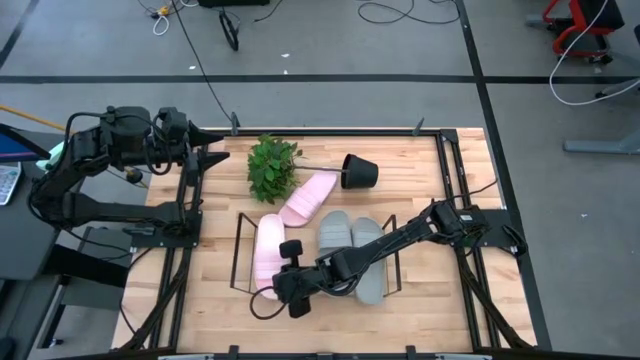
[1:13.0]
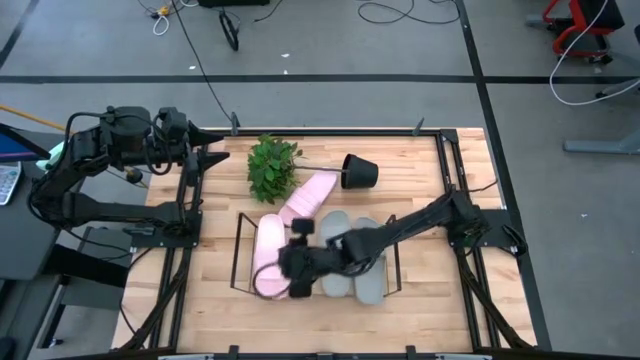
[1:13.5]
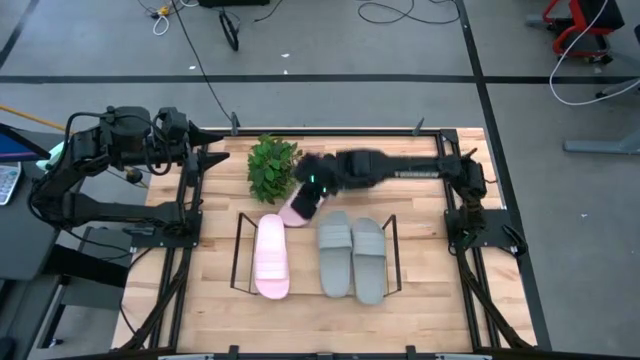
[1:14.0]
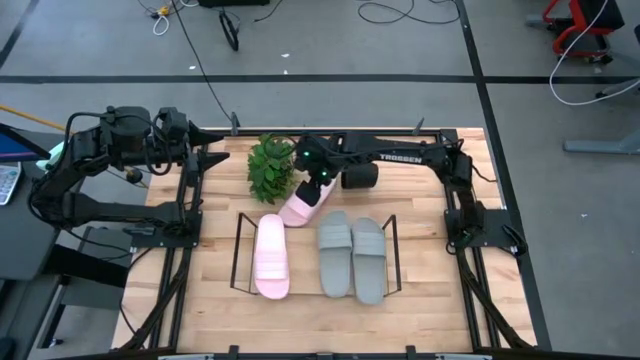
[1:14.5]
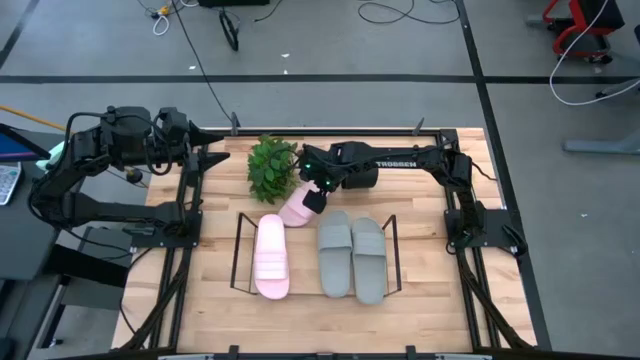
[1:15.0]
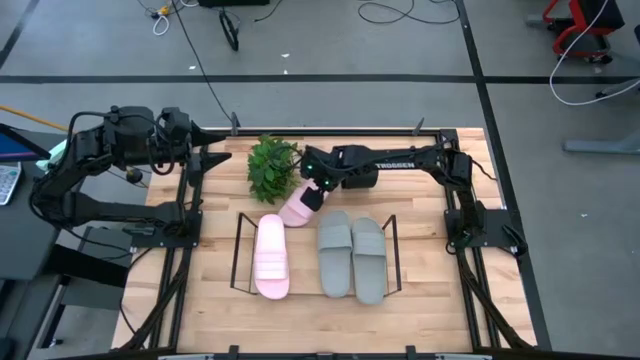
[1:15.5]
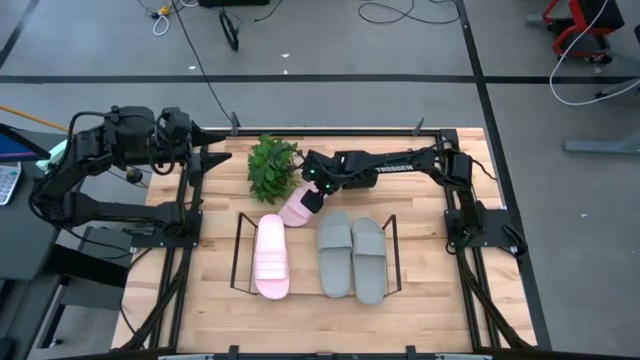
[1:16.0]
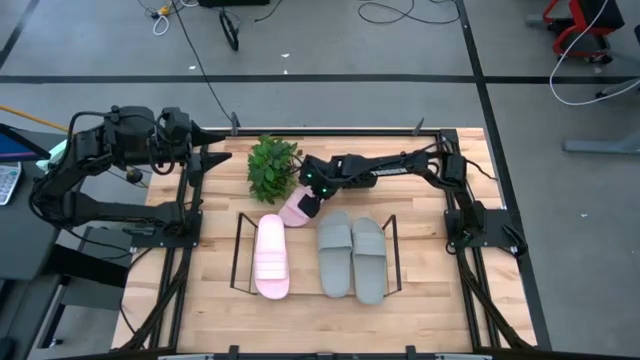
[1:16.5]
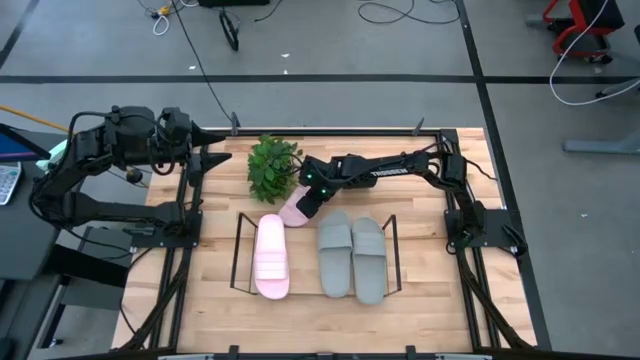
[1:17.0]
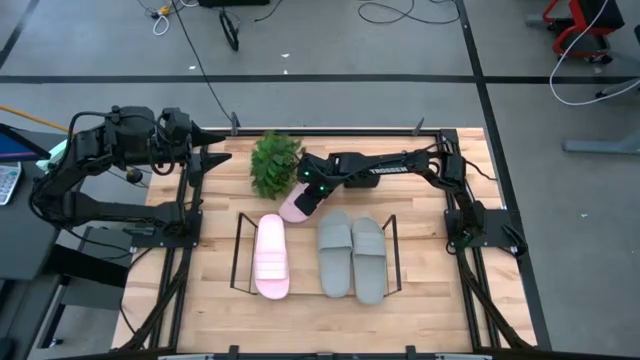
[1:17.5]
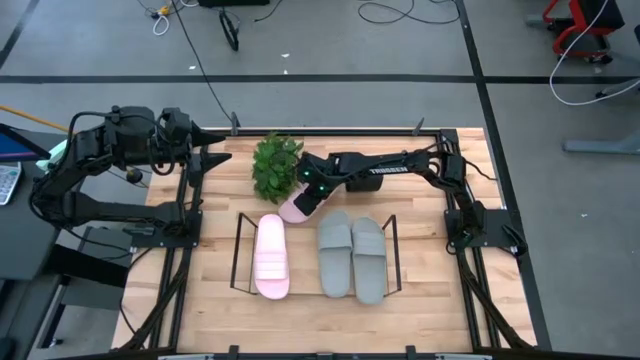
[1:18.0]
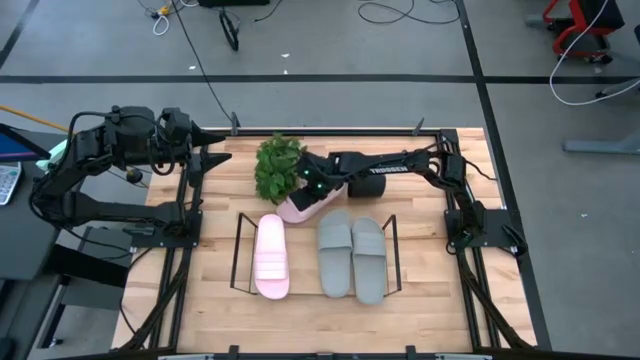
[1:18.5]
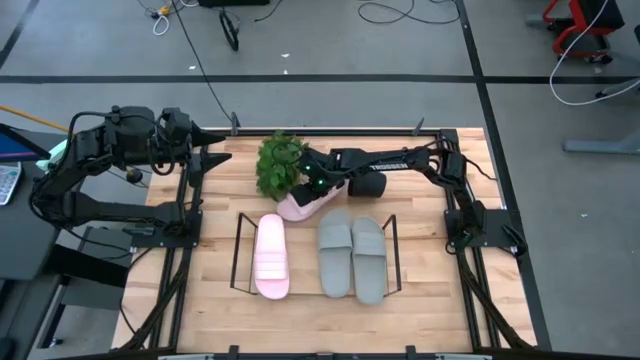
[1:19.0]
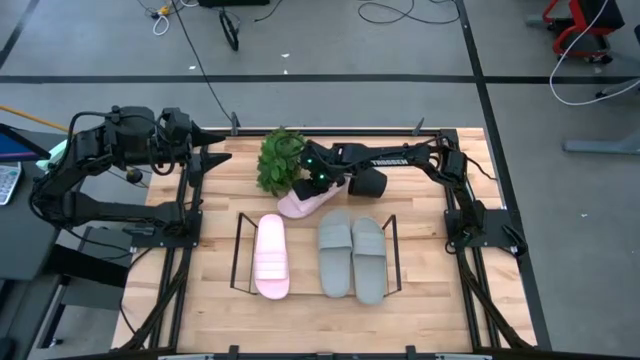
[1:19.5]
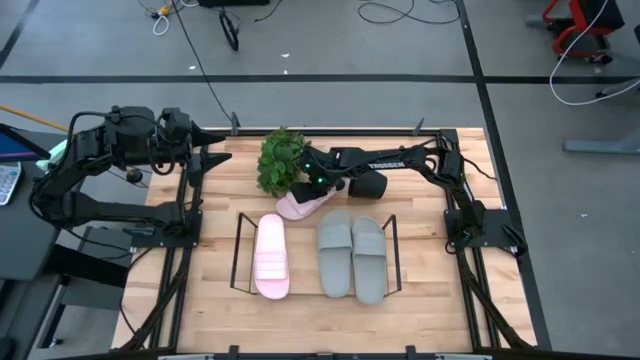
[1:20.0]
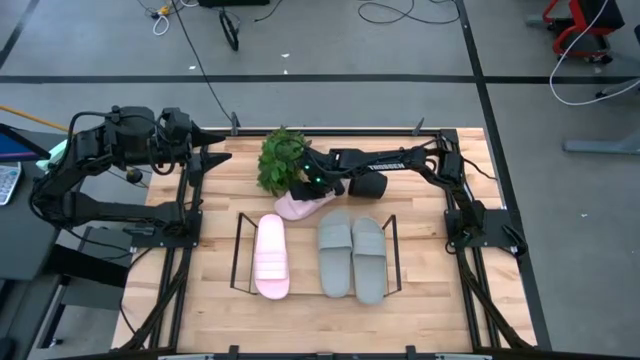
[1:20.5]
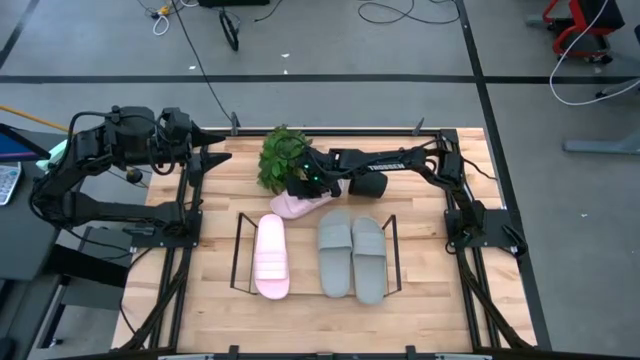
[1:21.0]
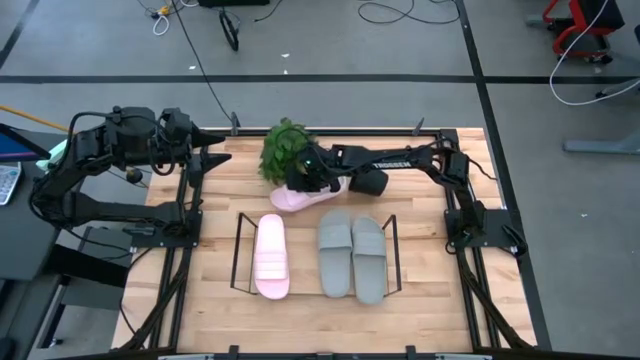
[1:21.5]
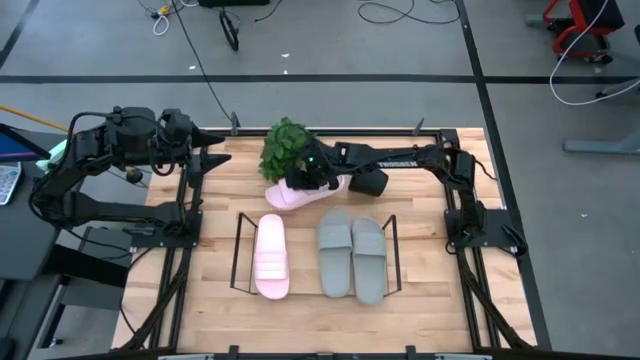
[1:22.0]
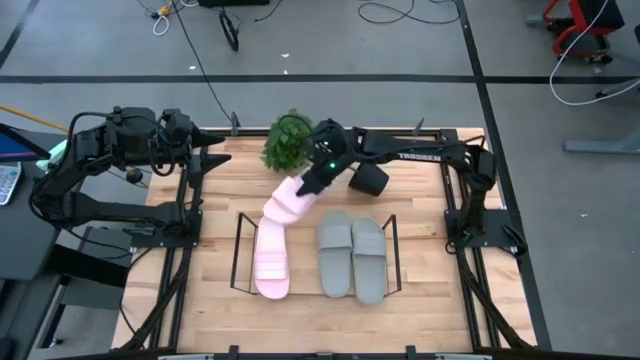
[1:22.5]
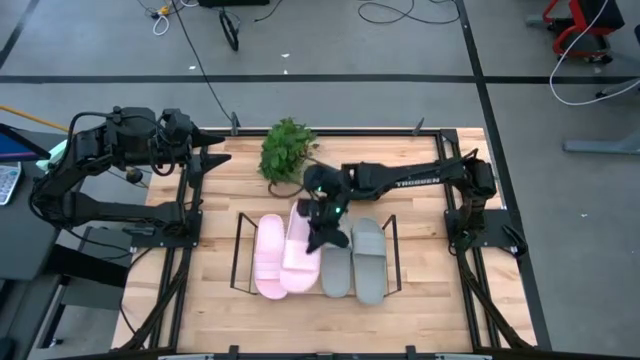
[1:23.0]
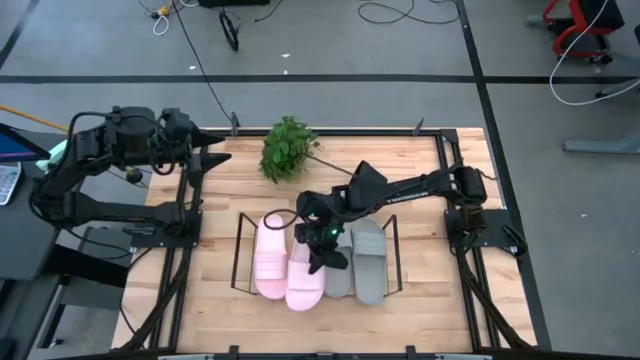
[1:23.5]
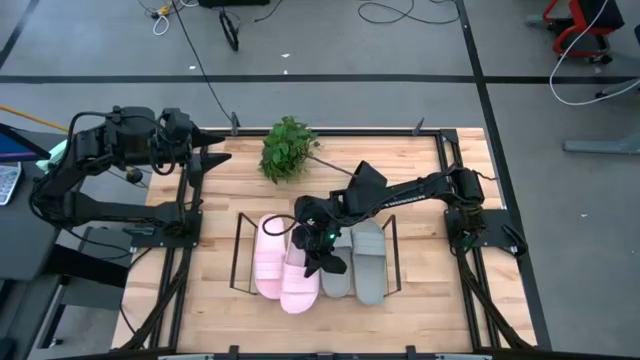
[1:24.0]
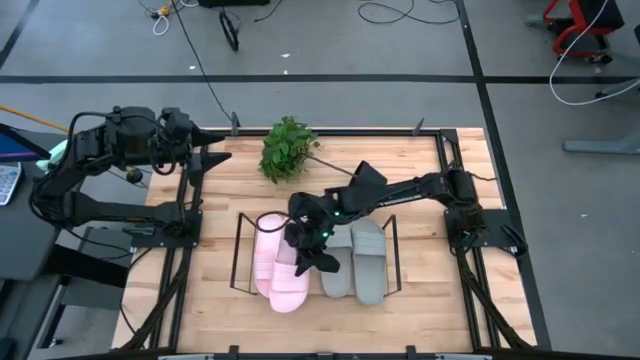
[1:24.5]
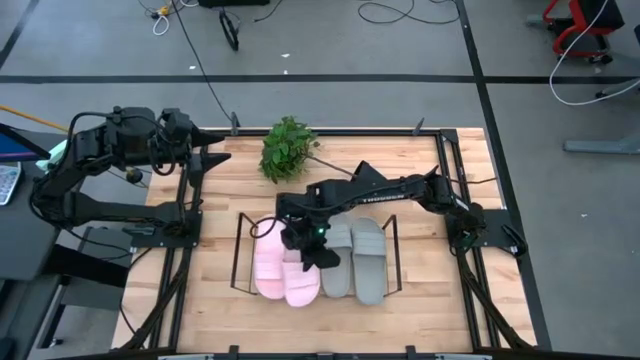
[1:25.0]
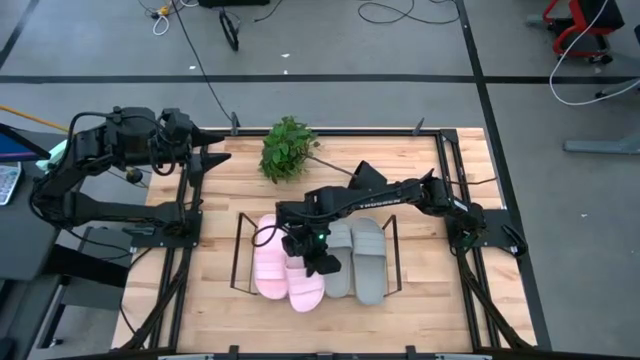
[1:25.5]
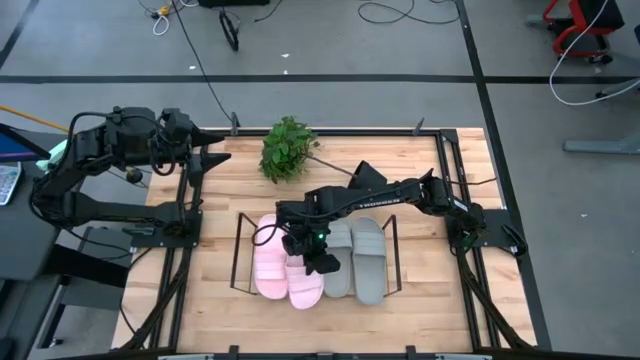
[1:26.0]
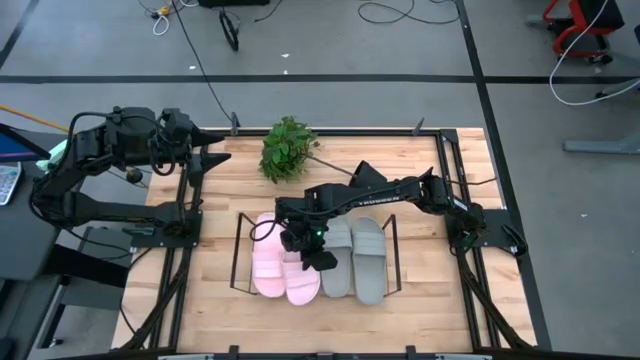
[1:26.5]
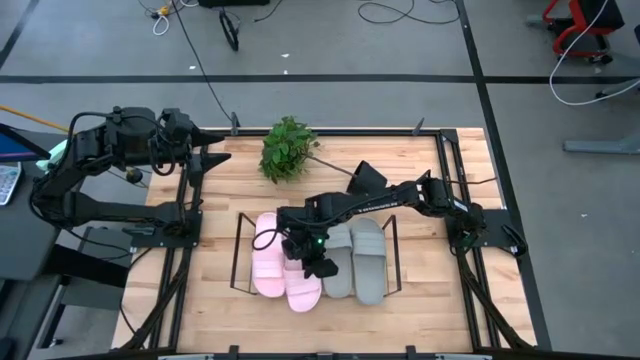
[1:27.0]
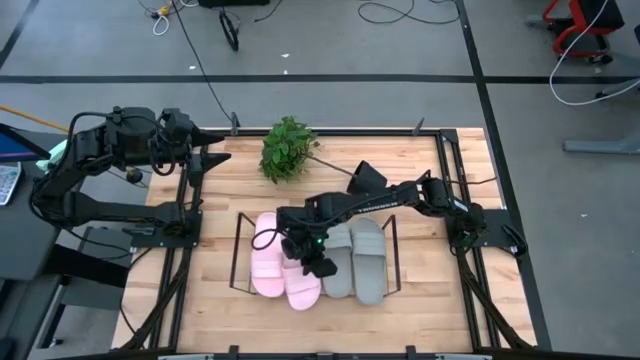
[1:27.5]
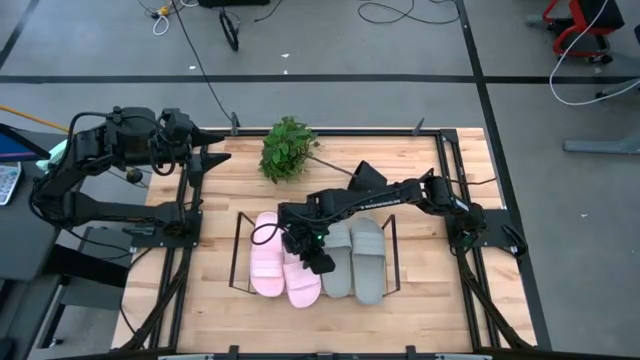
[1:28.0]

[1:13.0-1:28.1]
Task: Pick and place slides into the shelf
Put the pink slipper on the shelf

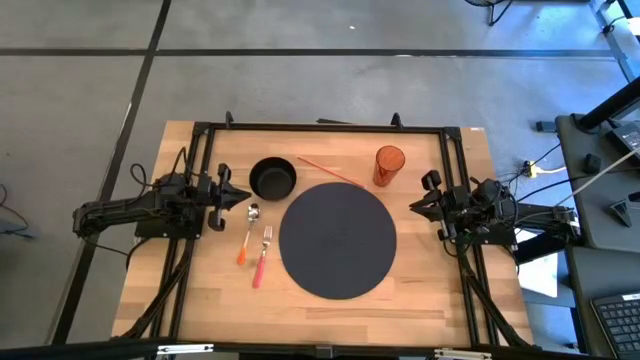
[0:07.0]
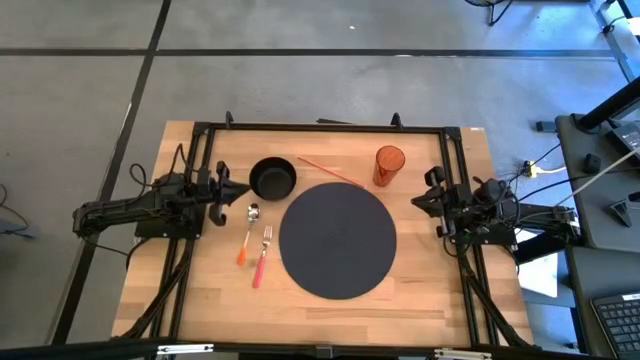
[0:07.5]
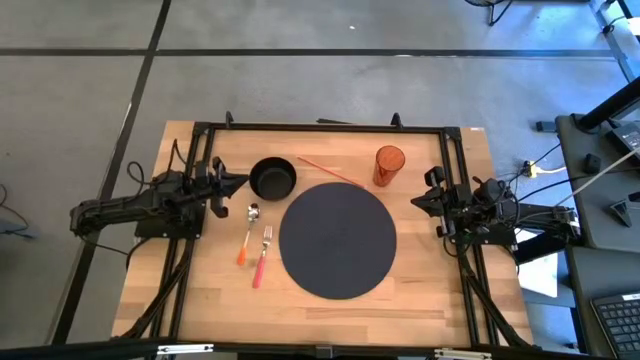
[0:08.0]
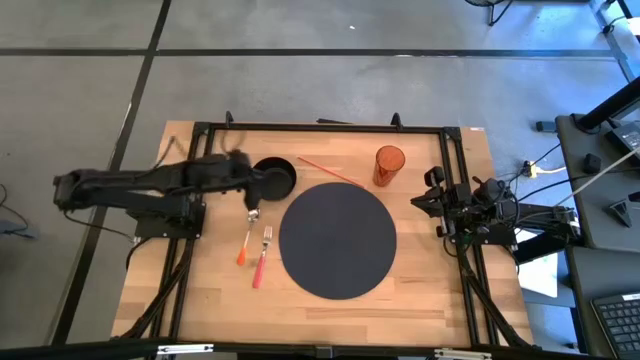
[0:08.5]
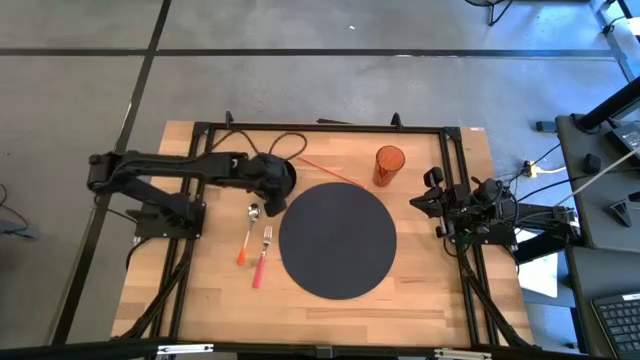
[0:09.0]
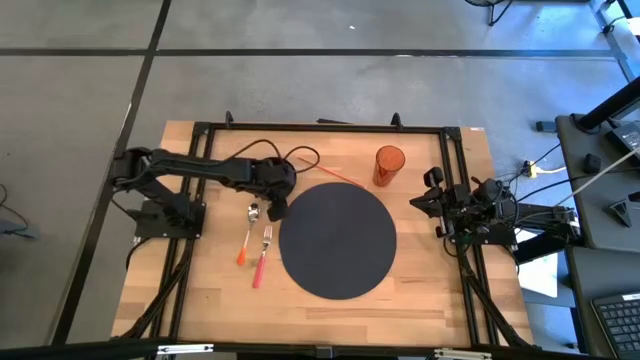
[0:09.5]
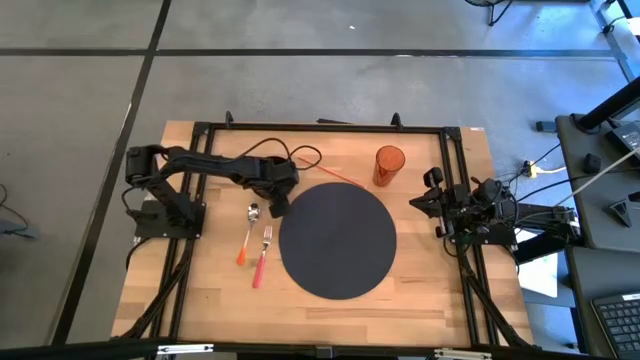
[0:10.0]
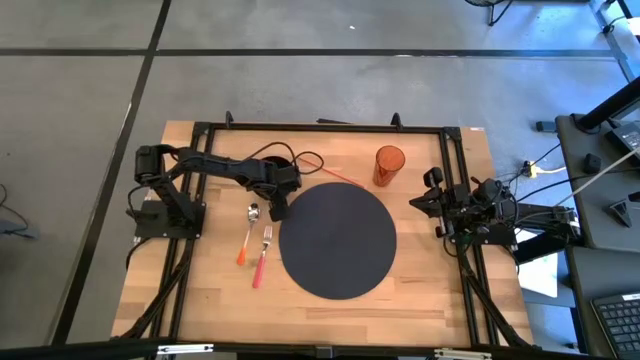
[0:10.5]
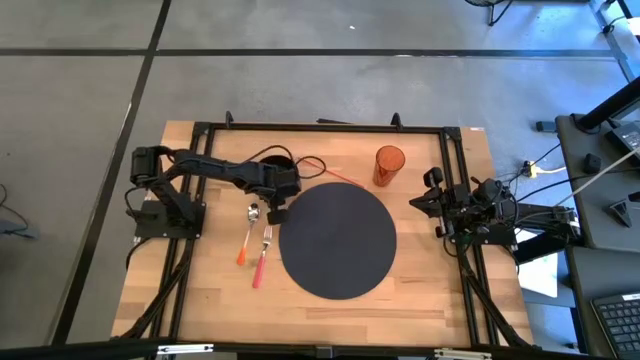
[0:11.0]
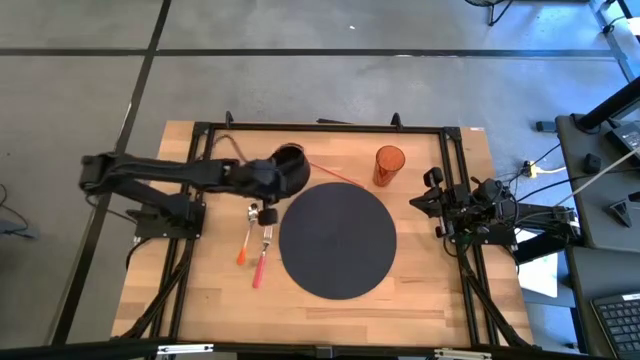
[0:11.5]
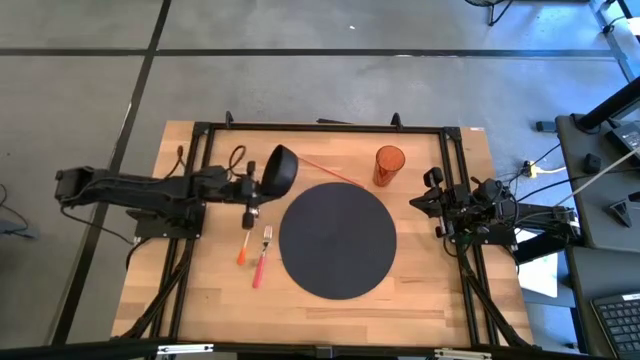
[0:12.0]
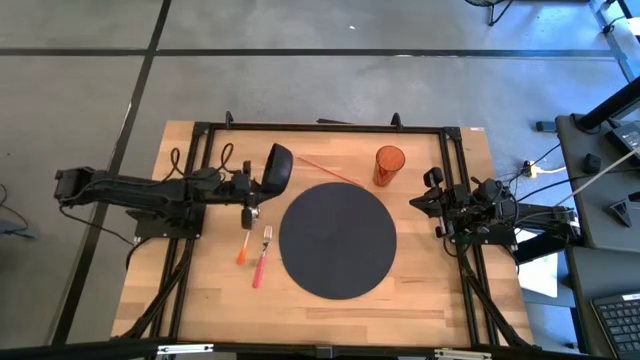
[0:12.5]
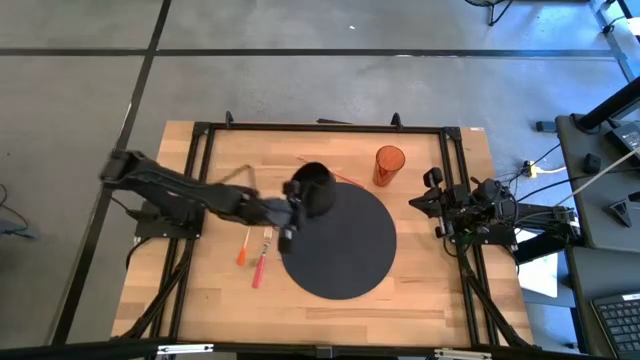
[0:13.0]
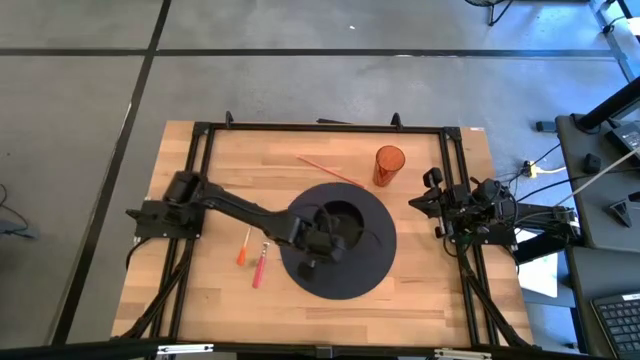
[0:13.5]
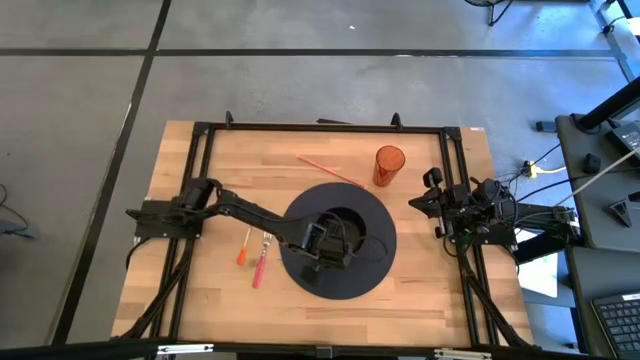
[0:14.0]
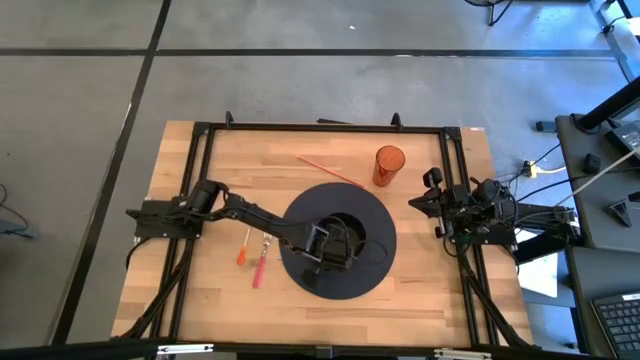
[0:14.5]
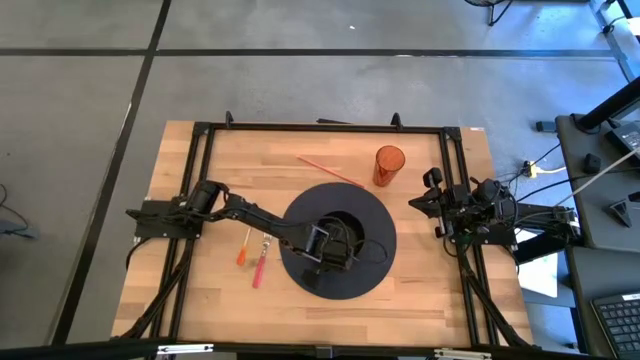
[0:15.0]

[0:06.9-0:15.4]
Task: Pick & Place Utensil
Put the black bowl on the black mat
